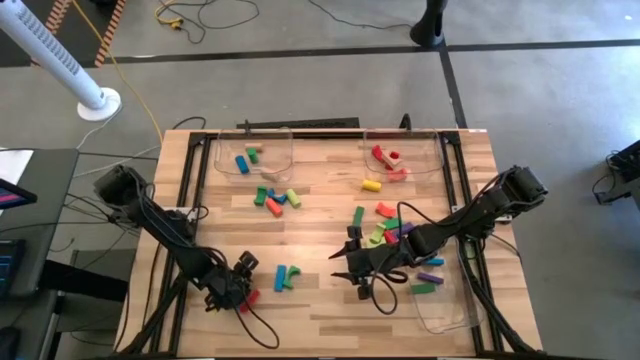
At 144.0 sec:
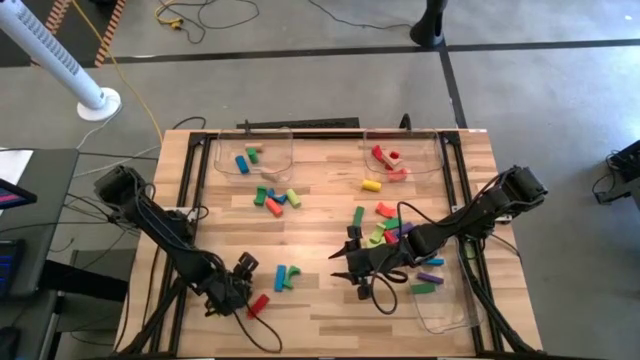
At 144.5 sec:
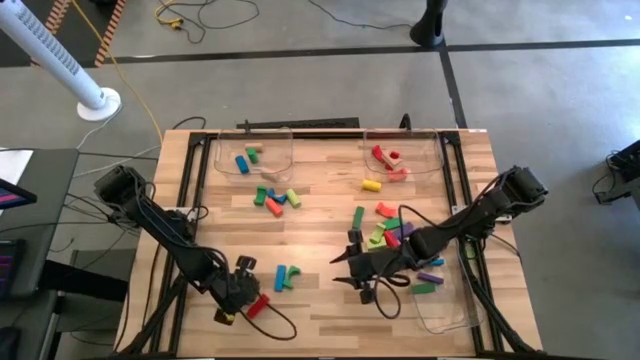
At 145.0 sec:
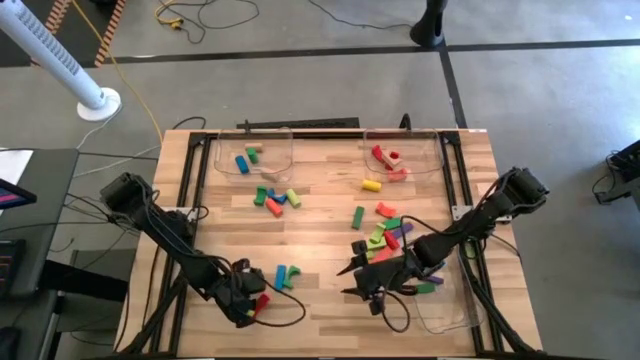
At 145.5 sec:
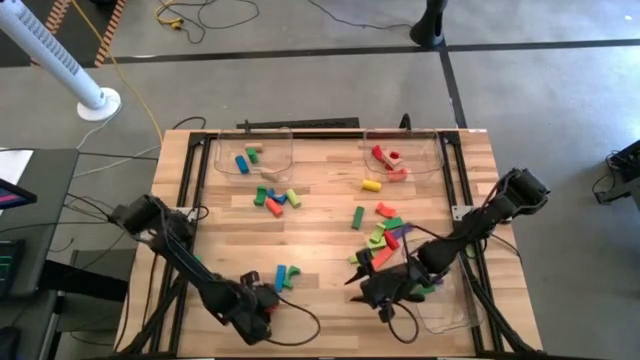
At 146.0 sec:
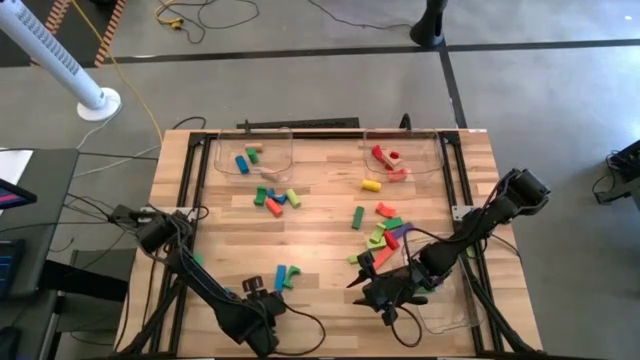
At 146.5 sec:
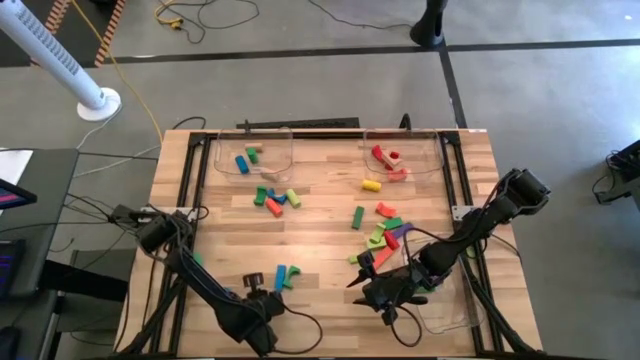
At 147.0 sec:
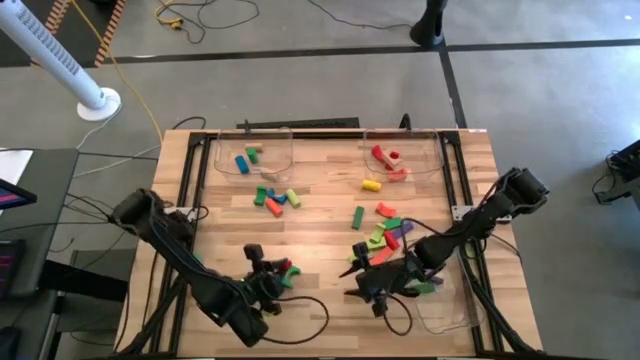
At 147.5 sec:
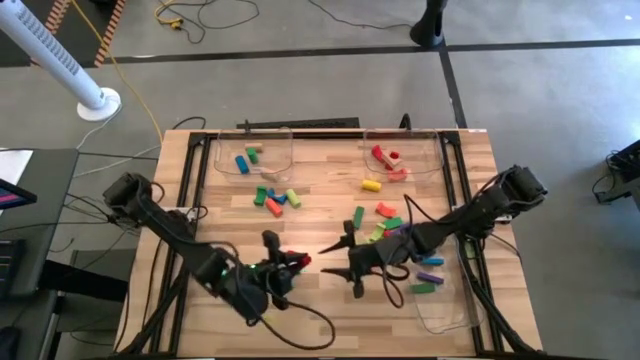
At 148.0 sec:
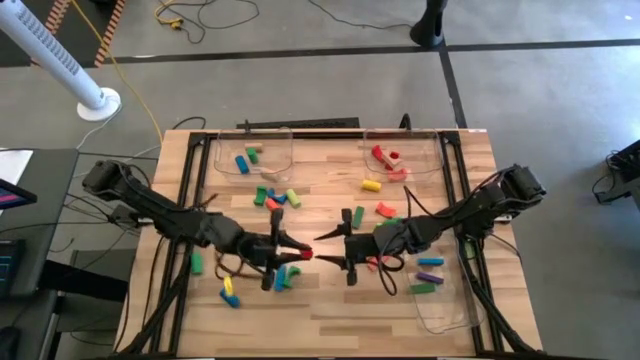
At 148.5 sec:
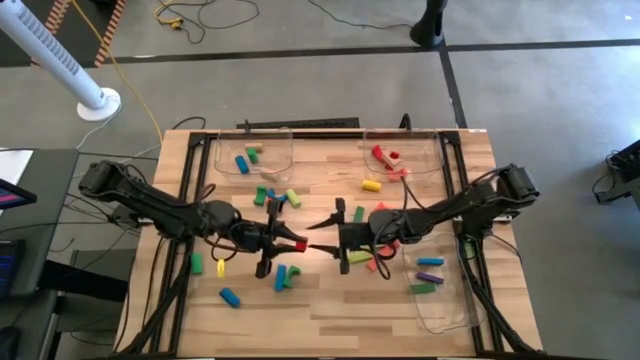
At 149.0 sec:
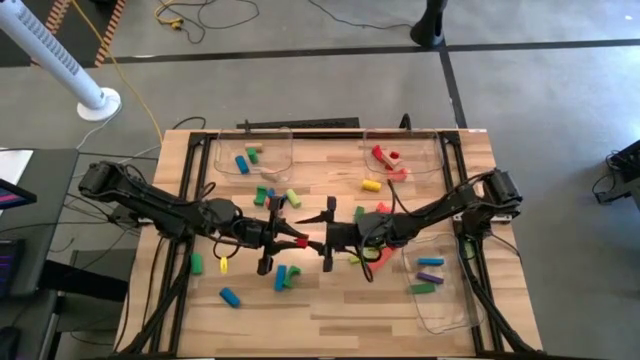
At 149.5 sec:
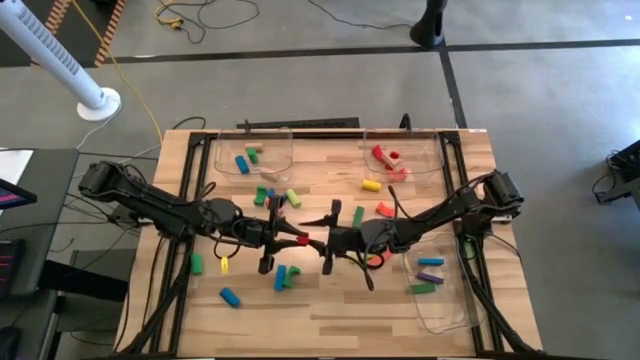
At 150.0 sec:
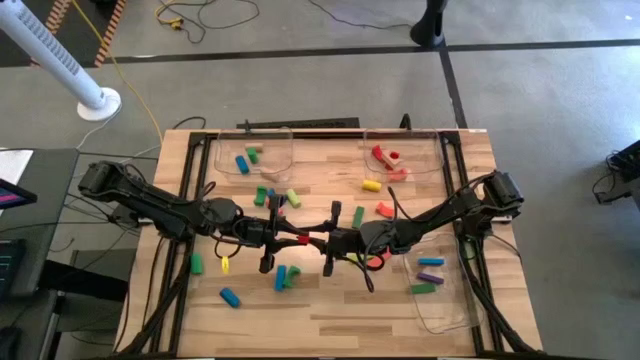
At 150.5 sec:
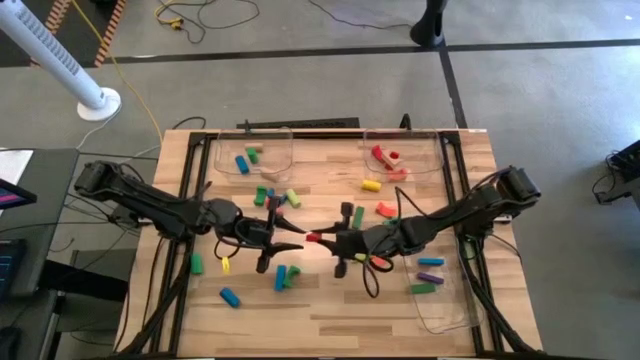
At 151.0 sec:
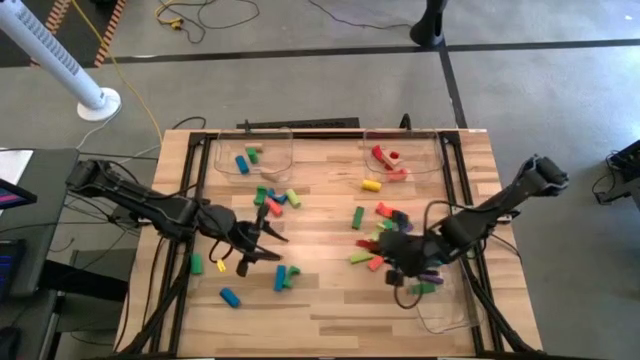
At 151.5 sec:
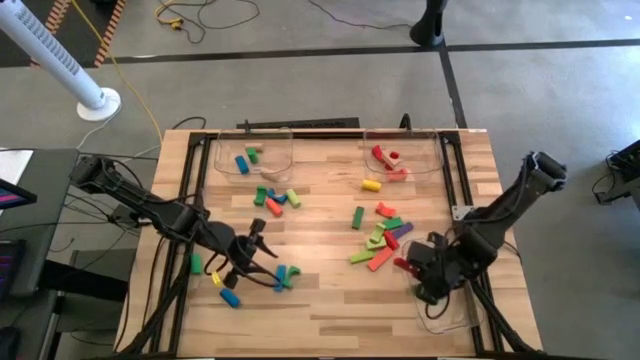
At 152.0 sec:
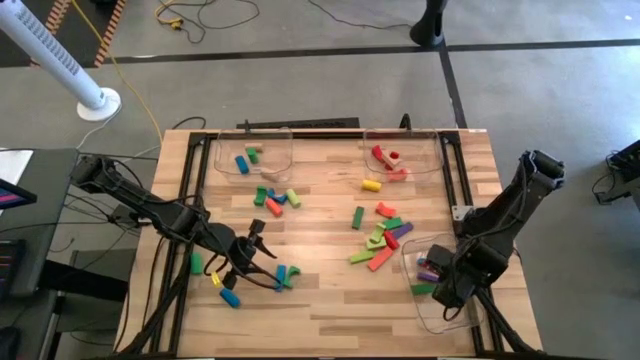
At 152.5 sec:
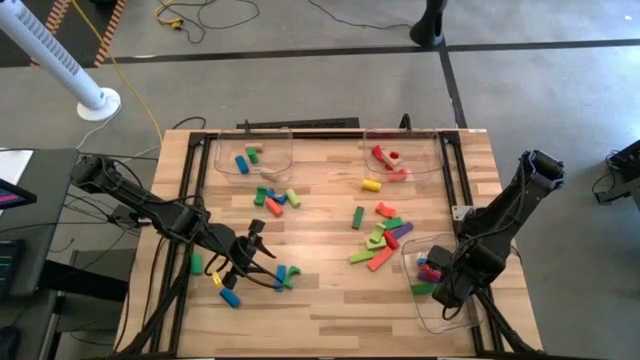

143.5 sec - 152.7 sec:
Task: Sort blocks by size
Put the red rectangular block into the top right transparent bin

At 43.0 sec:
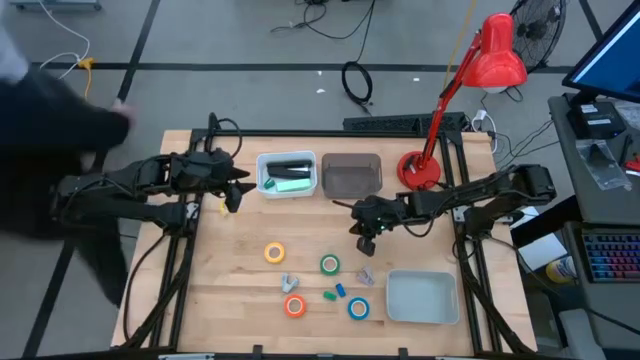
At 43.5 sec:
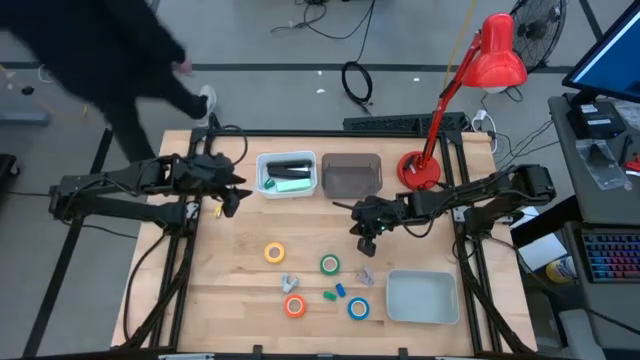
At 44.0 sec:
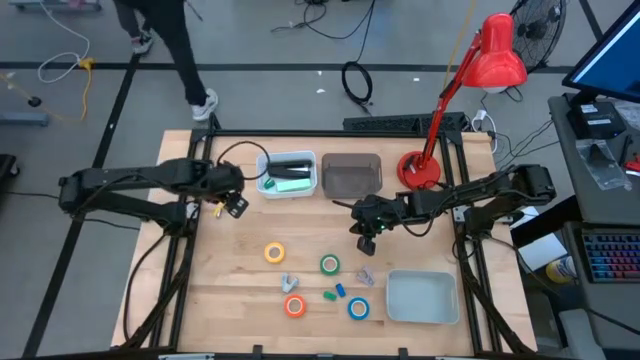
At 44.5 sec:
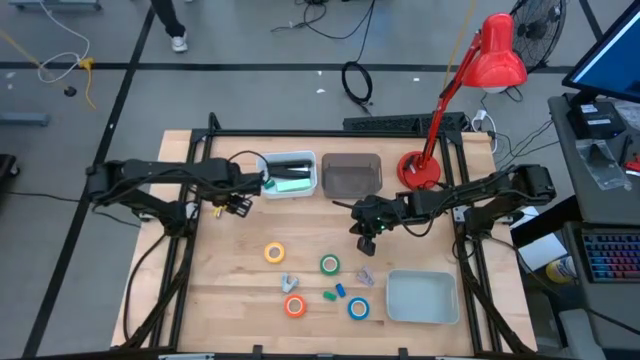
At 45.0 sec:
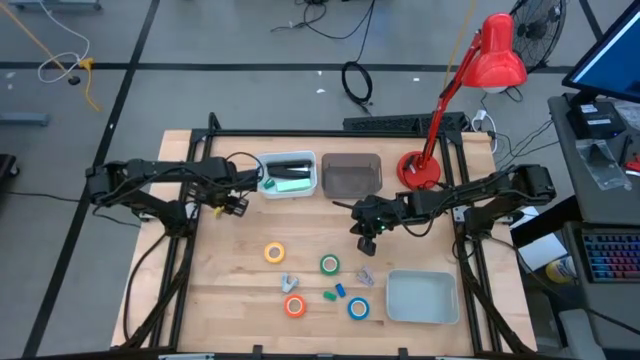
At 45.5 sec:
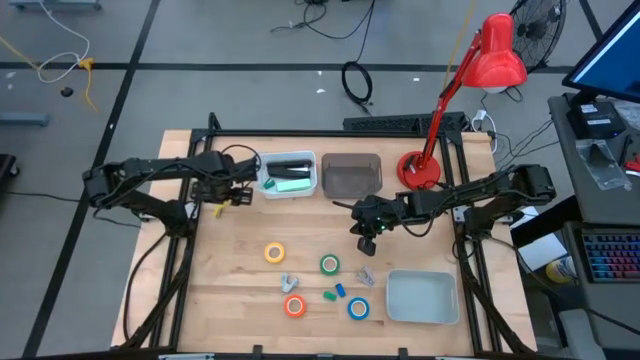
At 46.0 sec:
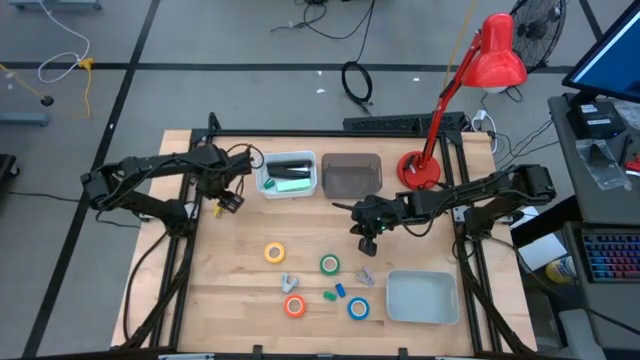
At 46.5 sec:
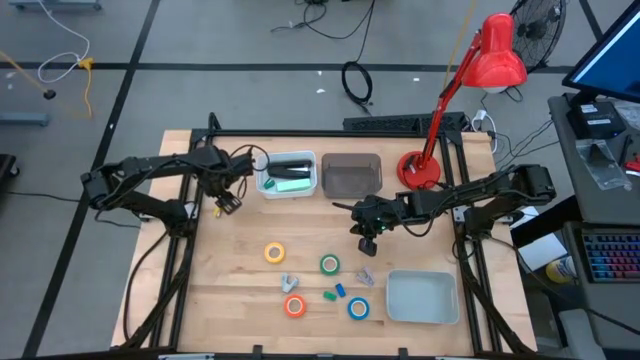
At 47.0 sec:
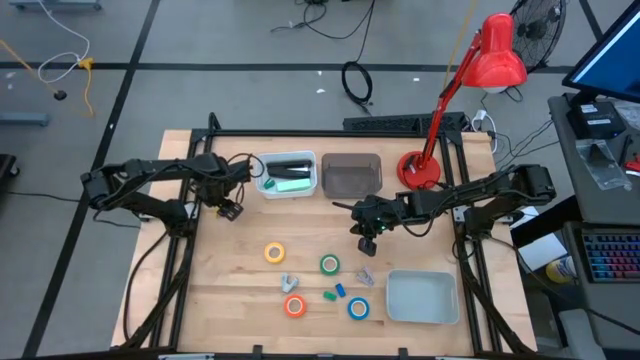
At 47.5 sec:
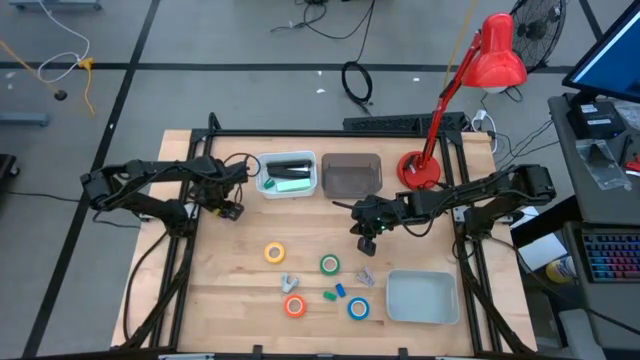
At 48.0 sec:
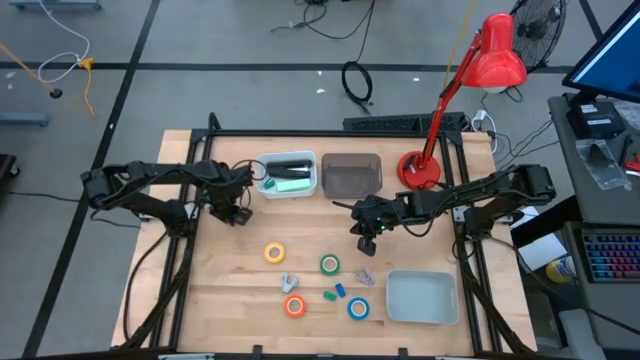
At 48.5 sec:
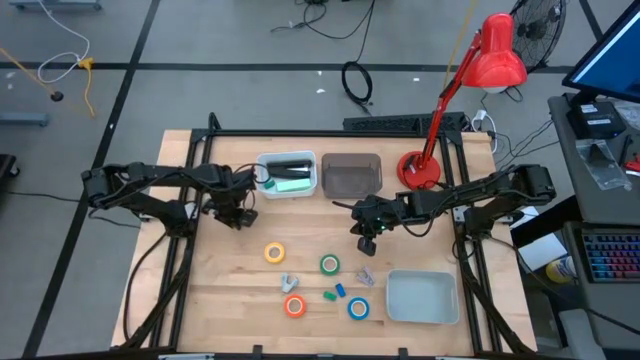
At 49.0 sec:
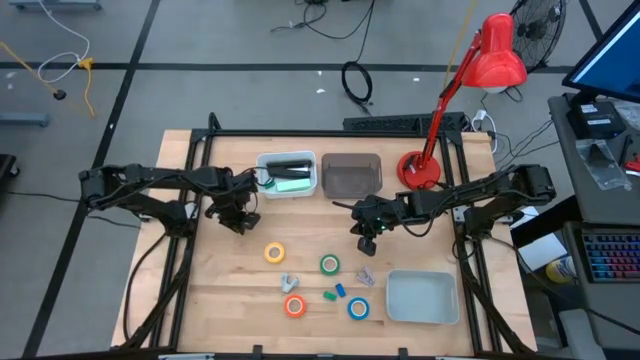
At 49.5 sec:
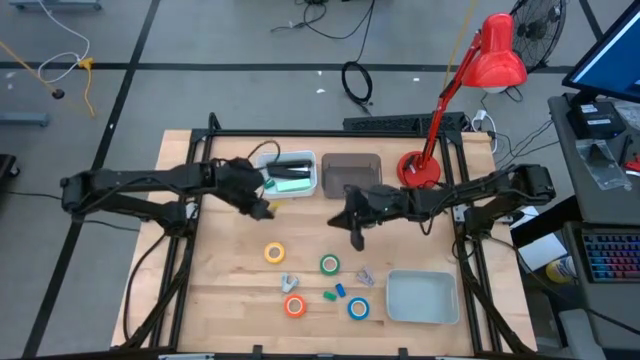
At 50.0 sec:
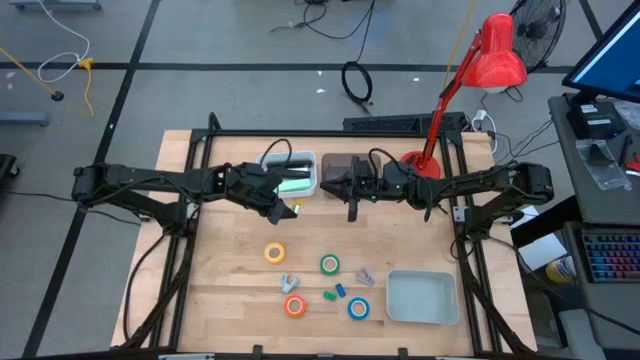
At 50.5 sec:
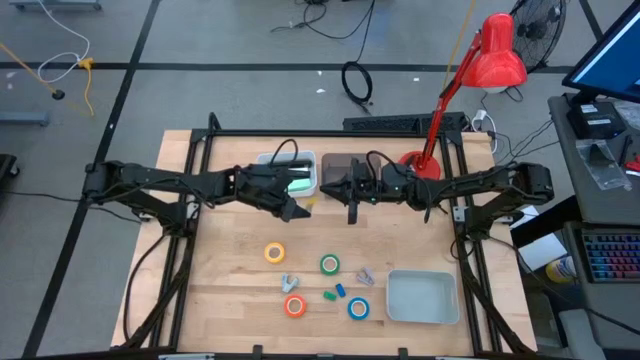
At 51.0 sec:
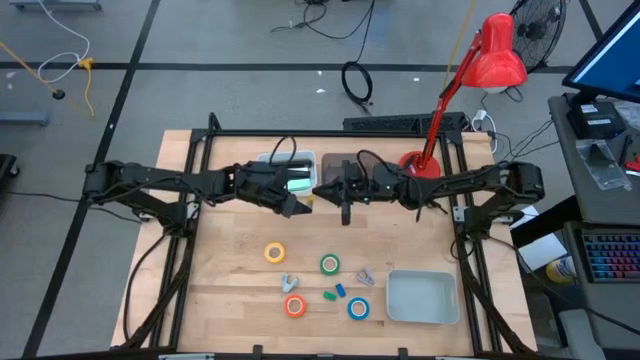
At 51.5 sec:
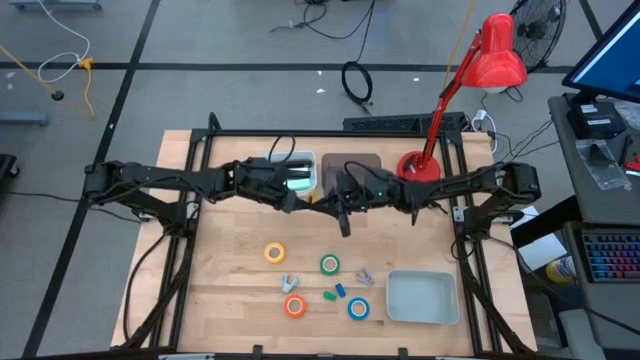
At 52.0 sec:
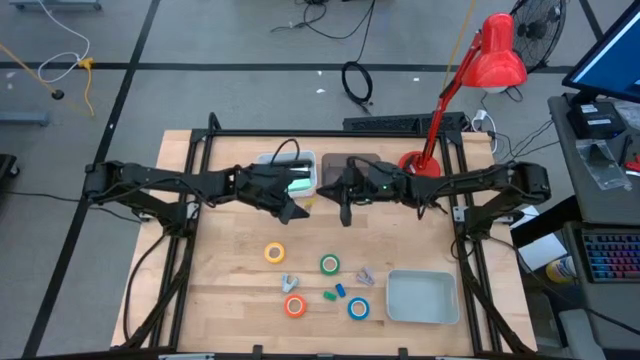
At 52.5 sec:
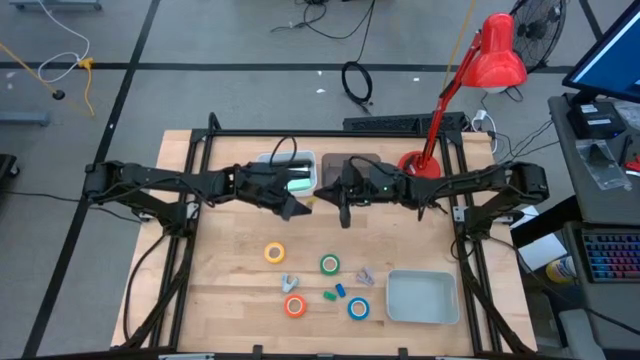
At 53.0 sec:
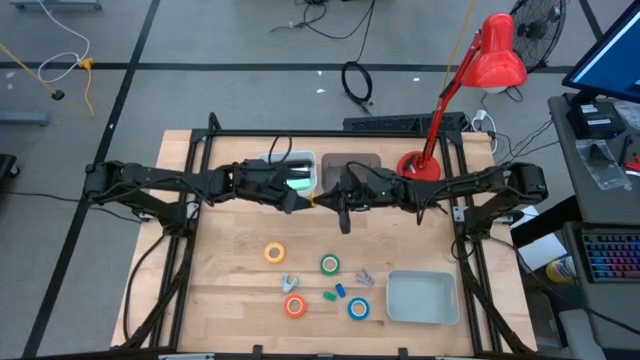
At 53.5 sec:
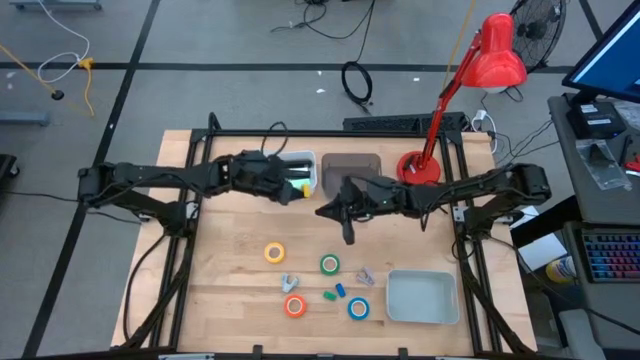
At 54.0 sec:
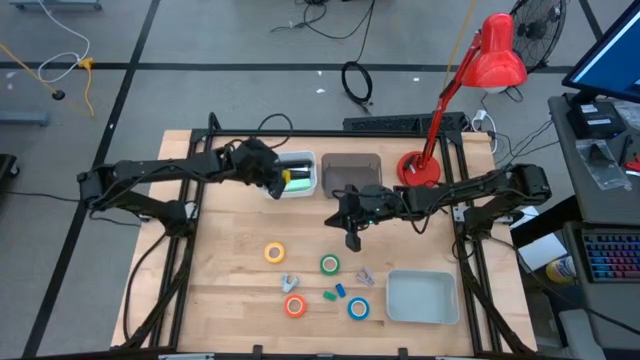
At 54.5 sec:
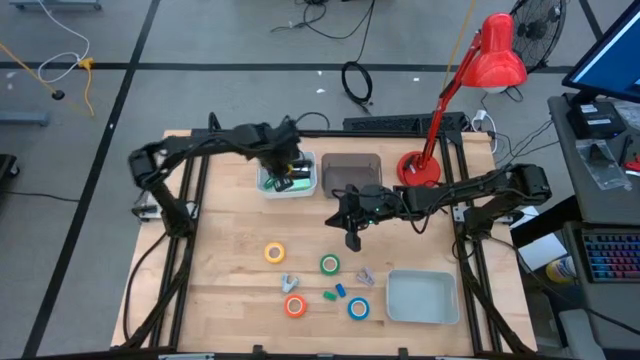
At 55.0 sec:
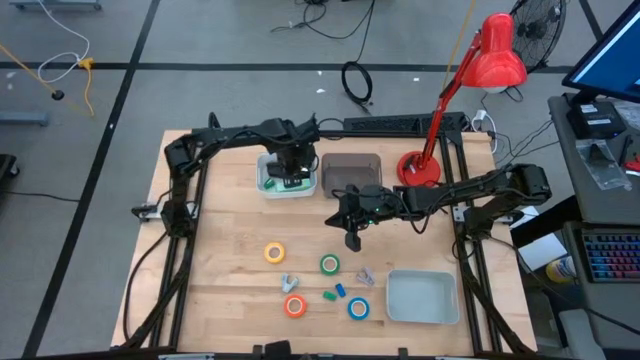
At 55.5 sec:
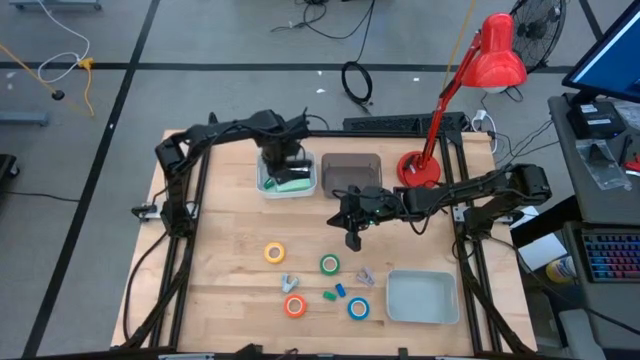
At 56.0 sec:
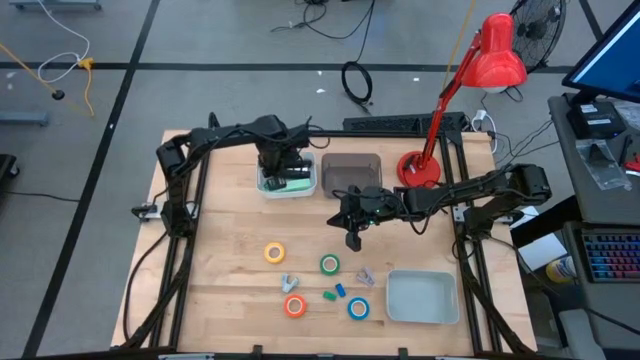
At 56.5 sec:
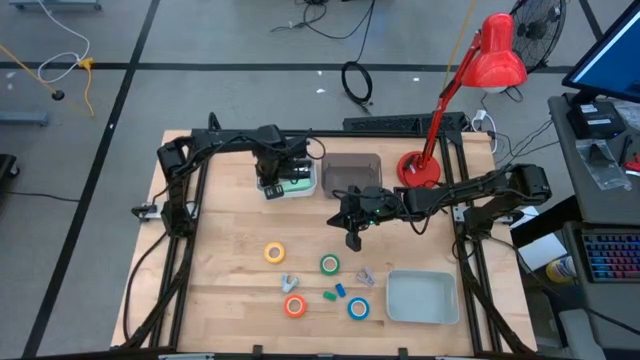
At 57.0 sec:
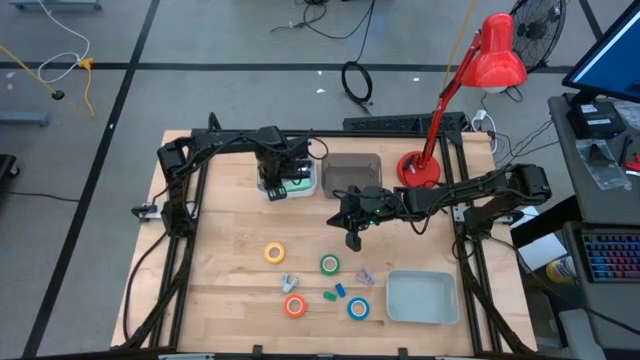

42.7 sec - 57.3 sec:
Task: Pick and place Stapler, Stapler remover, tape
Put the small yellow stapler into the white bin
